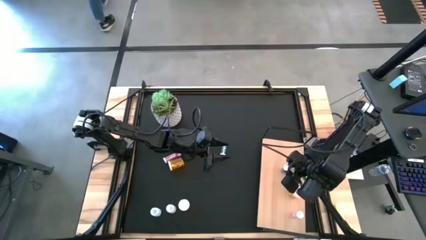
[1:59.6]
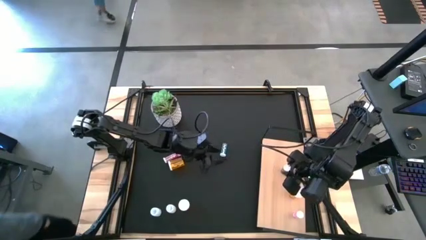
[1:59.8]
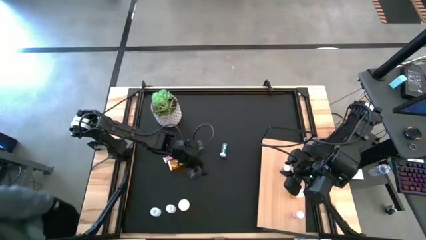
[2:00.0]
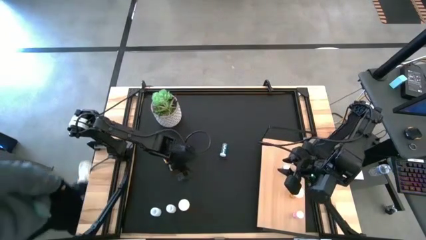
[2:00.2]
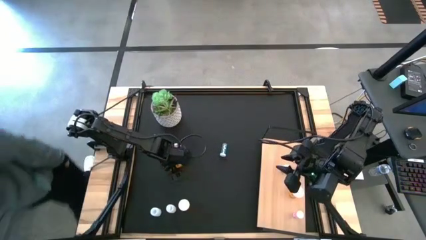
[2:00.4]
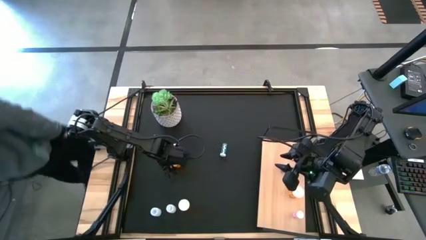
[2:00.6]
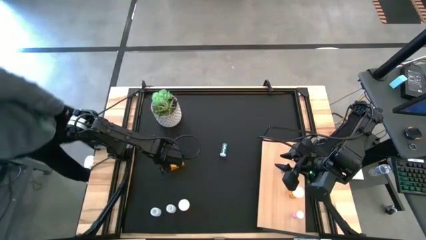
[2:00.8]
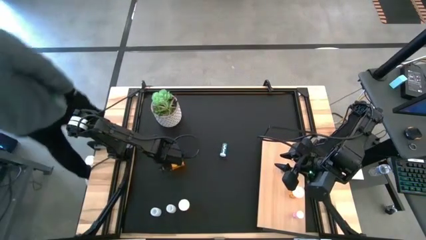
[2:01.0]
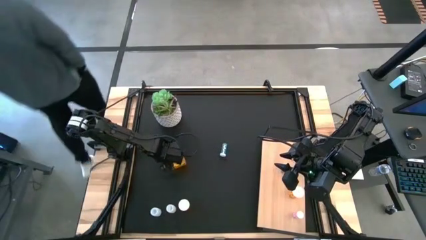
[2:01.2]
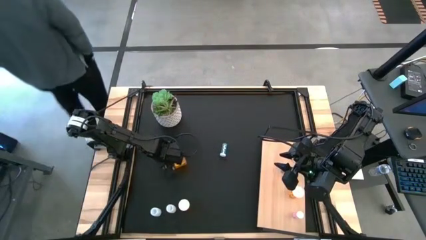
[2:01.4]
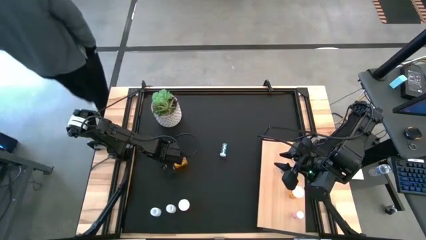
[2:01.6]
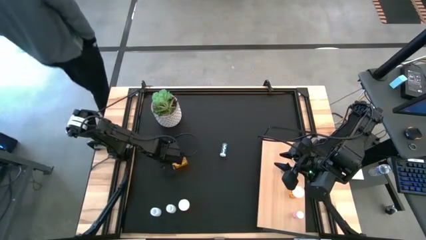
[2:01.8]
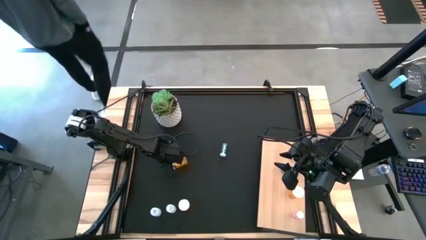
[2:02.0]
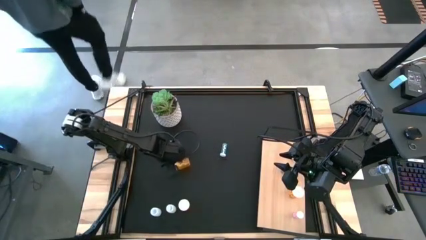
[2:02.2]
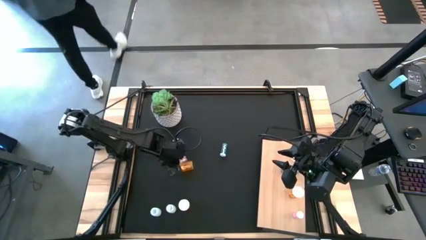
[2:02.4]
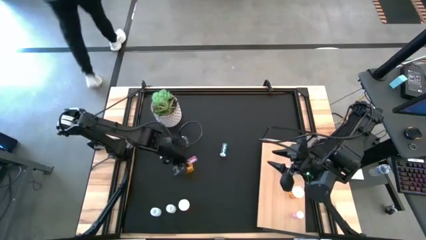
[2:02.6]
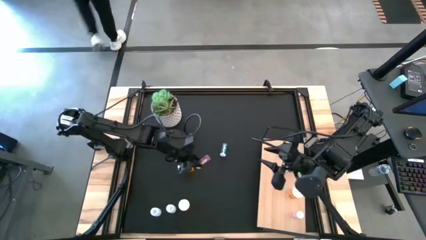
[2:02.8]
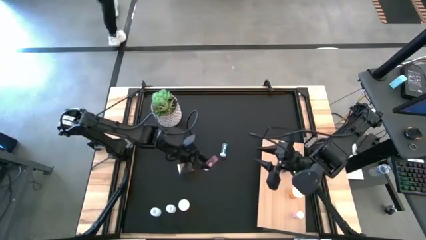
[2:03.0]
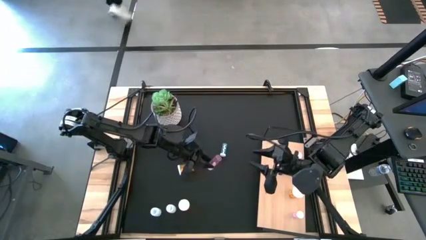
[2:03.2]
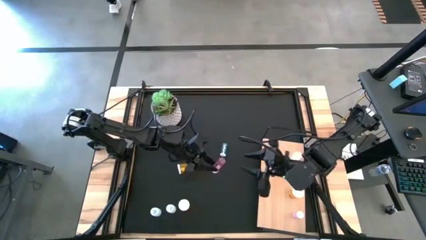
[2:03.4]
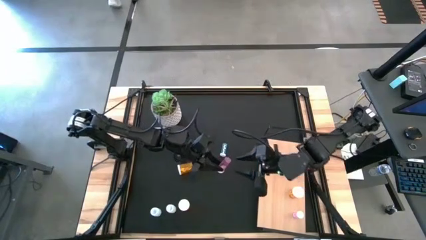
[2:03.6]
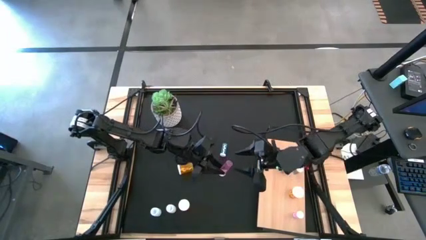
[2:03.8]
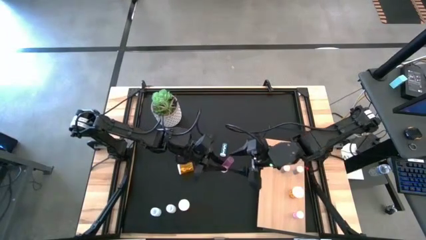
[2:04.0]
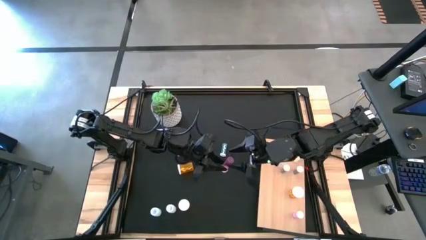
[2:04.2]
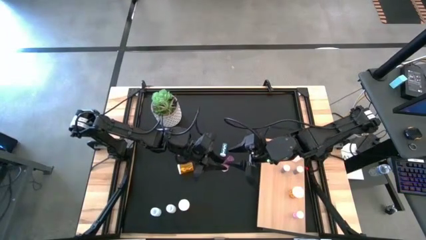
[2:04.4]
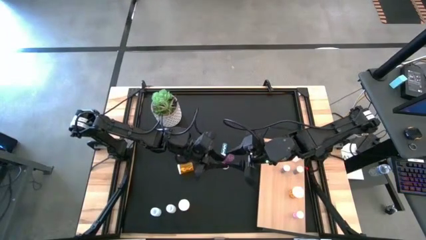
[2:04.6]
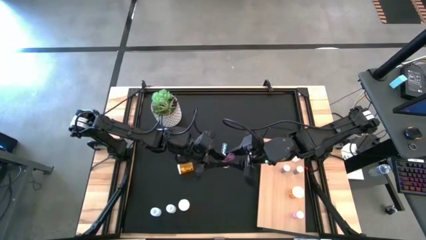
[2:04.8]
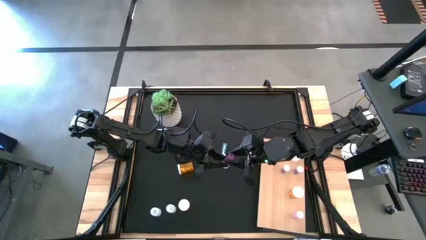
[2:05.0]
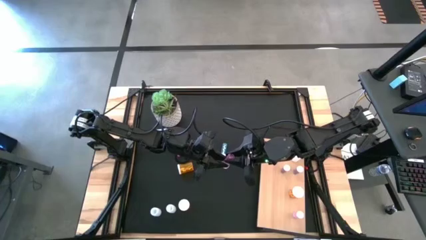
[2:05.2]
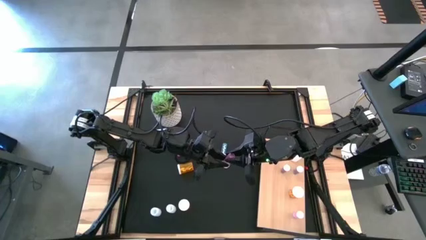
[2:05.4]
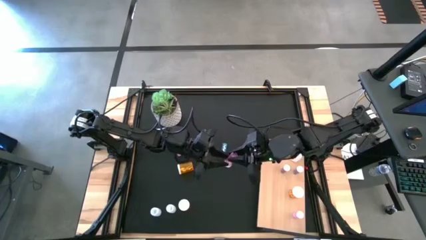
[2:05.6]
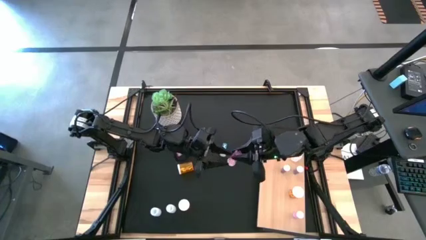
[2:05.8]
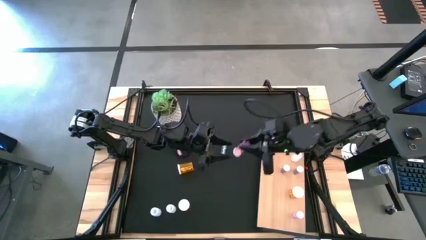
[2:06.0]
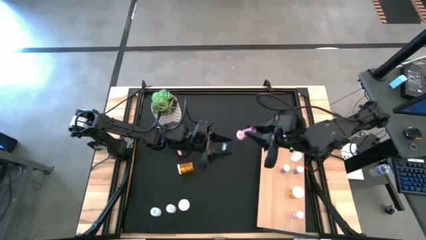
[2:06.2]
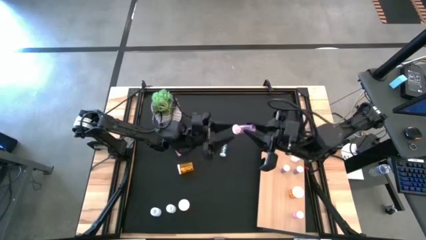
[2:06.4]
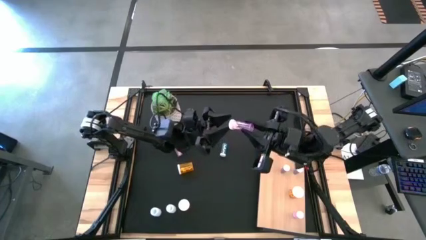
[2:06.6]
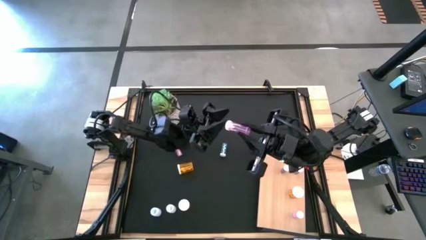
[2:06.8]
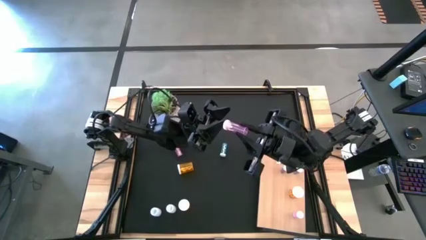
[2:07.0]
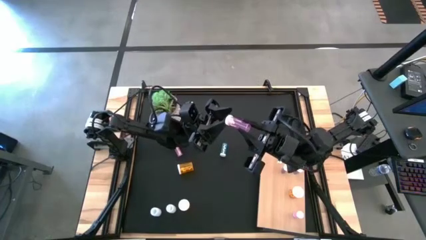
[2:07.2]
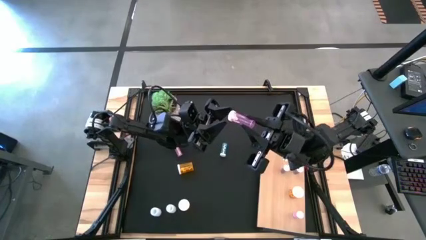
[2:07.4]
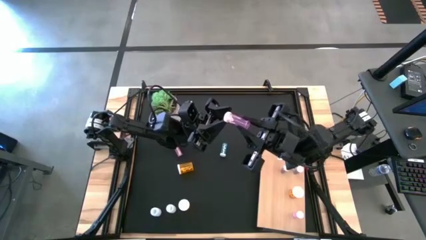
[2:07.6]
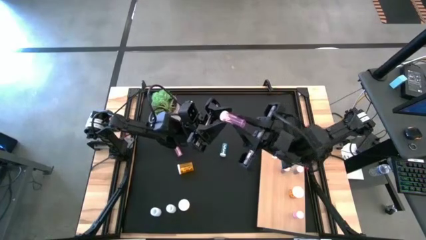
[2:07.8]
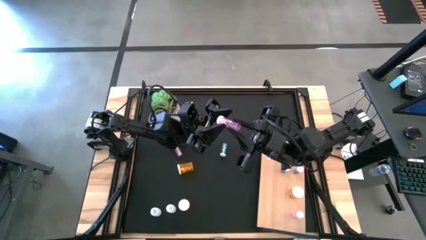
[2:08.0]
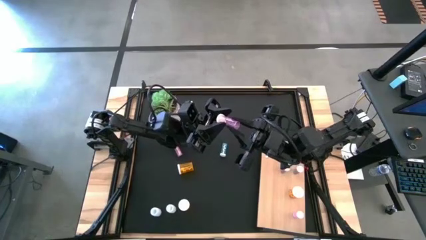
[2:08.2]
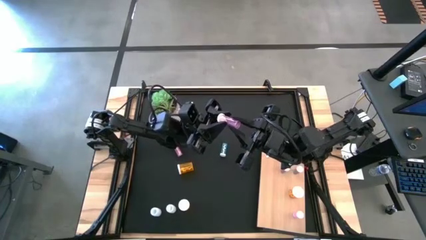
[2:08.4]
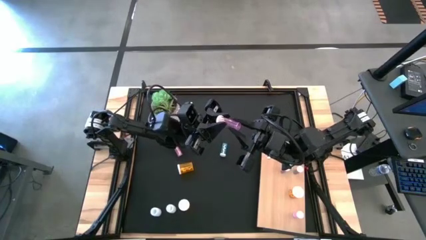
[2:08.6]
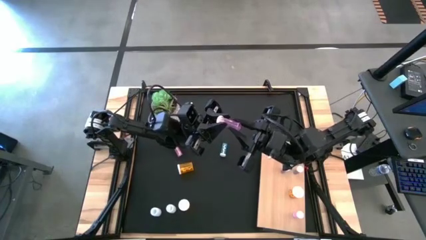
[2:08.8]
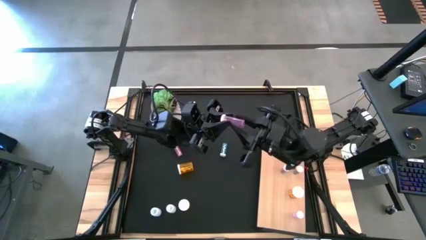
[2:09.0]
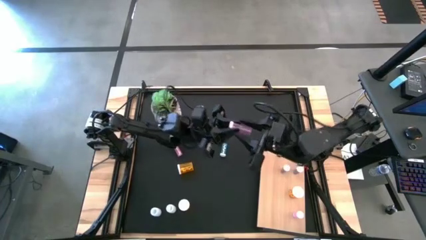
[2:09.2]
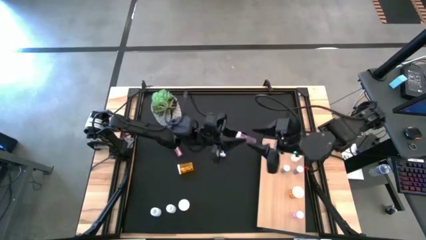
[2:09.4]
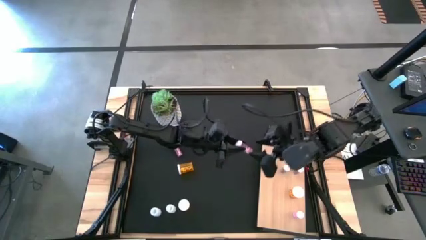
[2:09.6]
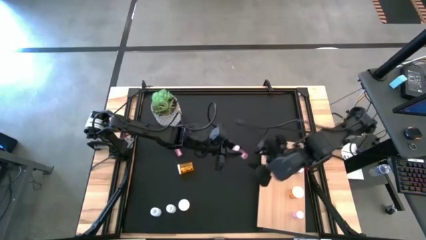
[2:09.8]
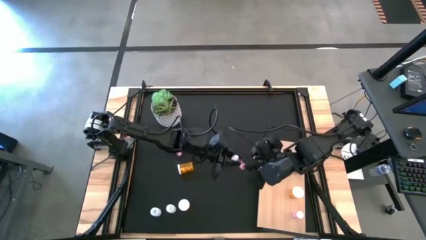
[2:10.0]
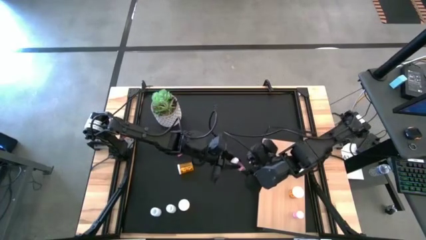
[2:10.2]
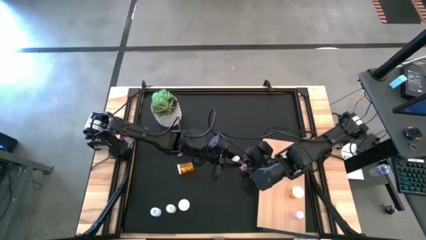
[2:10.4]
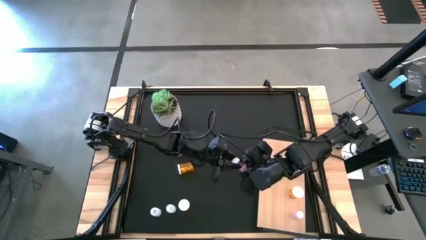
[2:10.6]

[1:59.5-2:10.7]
Task: Pick and place medicine bottles onto shelf by color
Put the left pink pill bottle on the shelf aligned with the other pink pill bottle

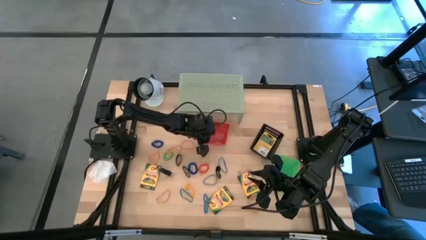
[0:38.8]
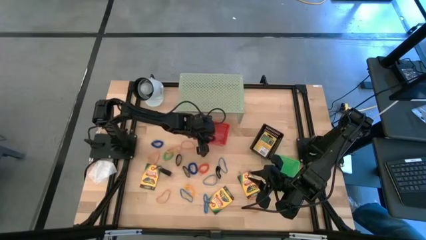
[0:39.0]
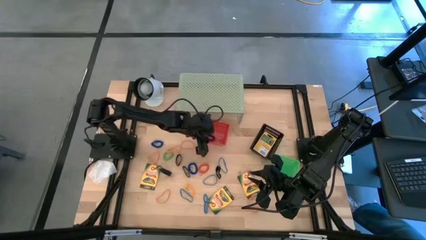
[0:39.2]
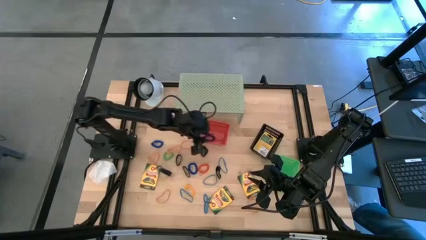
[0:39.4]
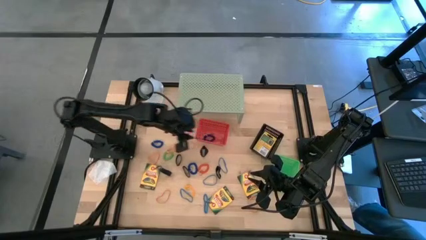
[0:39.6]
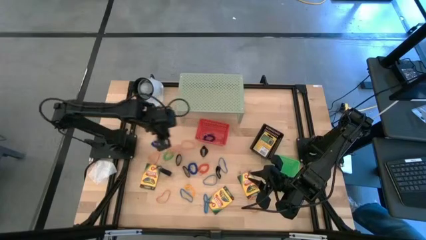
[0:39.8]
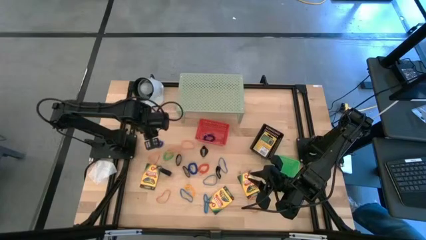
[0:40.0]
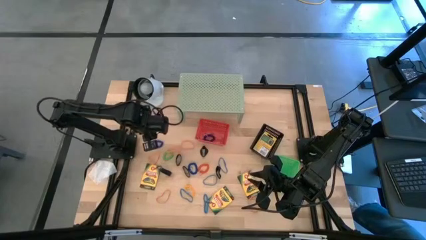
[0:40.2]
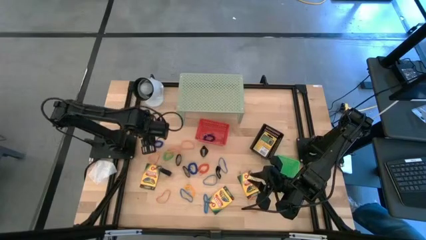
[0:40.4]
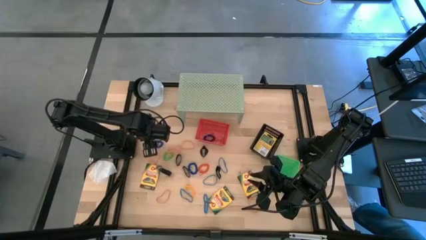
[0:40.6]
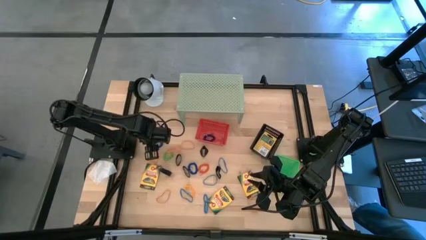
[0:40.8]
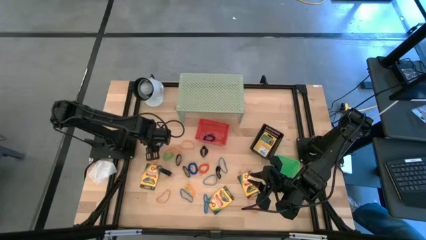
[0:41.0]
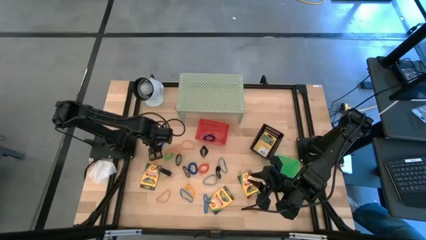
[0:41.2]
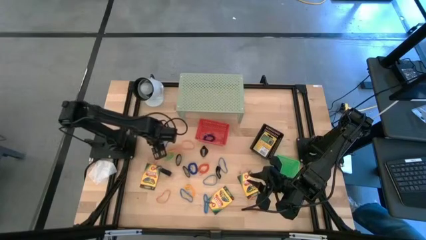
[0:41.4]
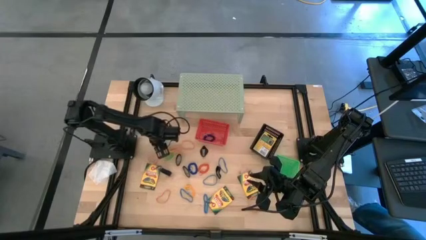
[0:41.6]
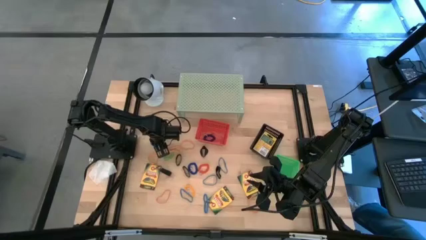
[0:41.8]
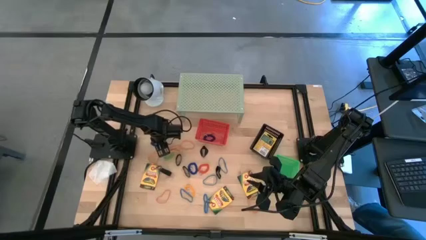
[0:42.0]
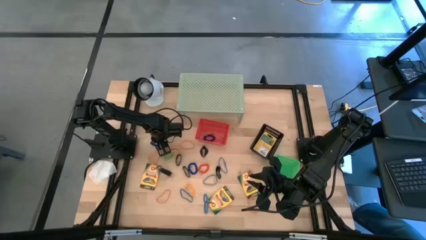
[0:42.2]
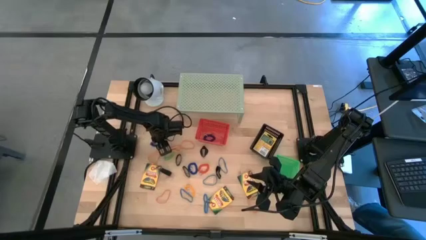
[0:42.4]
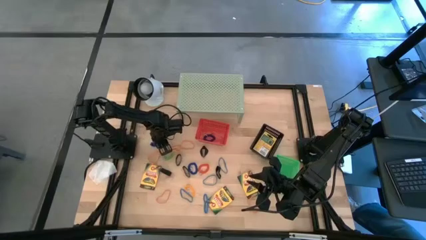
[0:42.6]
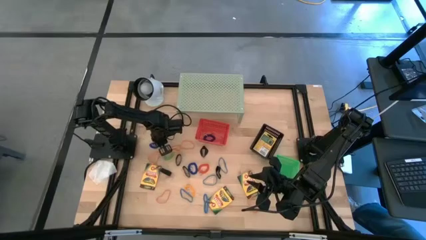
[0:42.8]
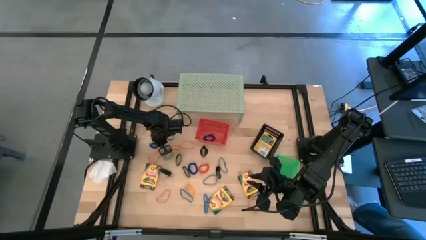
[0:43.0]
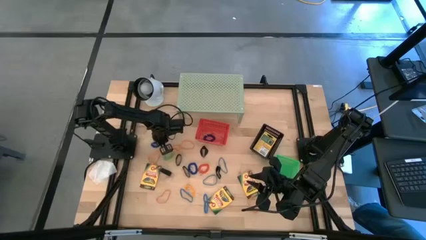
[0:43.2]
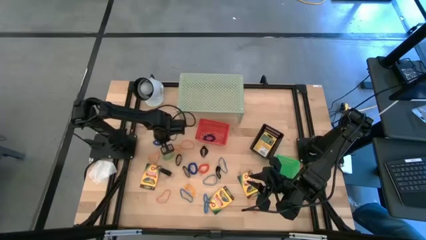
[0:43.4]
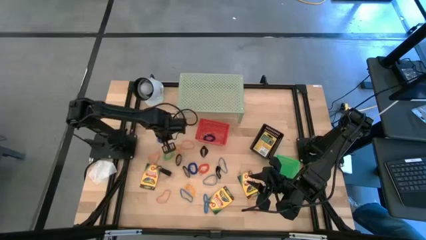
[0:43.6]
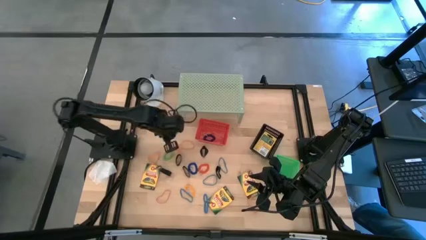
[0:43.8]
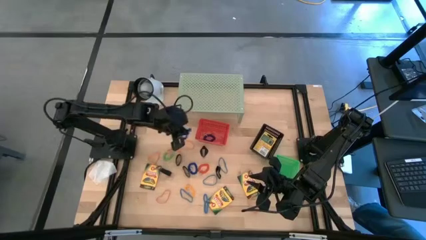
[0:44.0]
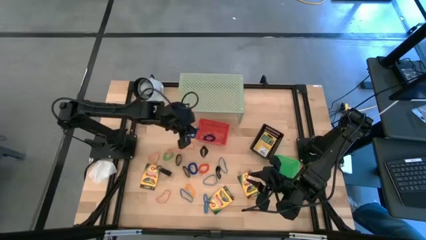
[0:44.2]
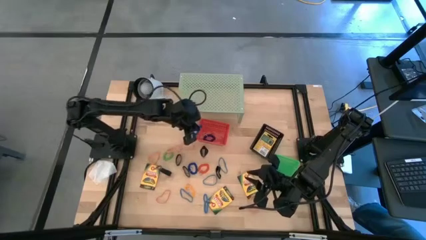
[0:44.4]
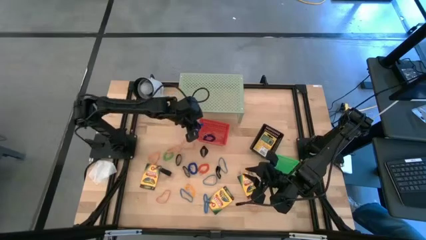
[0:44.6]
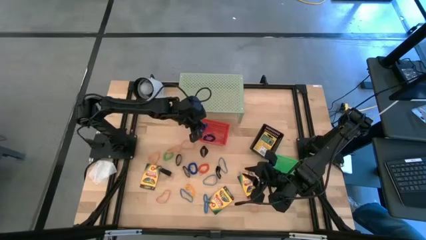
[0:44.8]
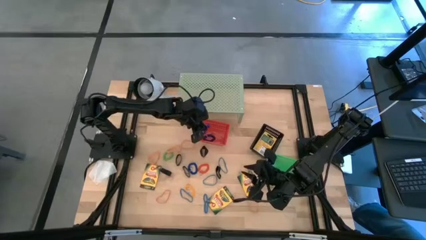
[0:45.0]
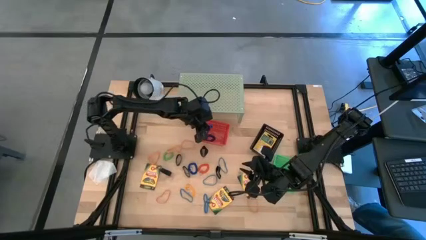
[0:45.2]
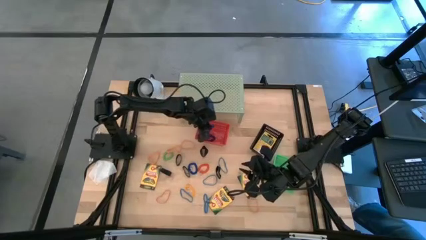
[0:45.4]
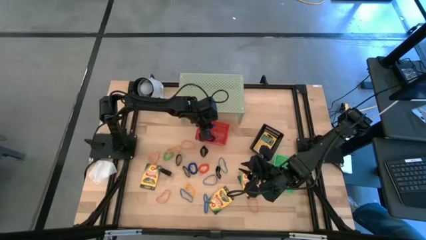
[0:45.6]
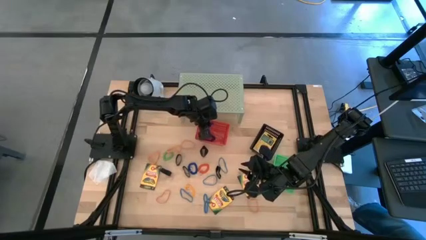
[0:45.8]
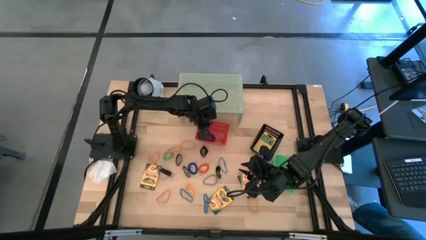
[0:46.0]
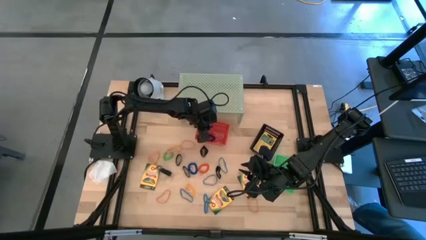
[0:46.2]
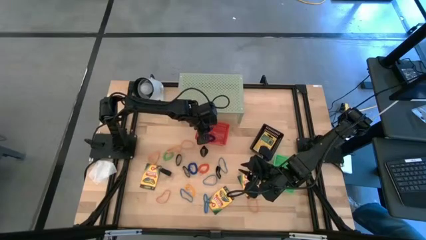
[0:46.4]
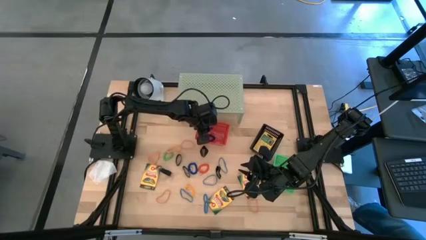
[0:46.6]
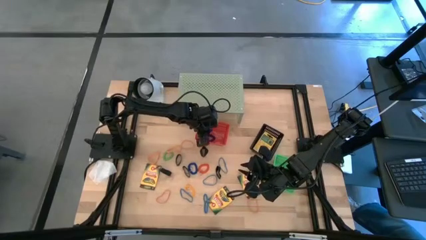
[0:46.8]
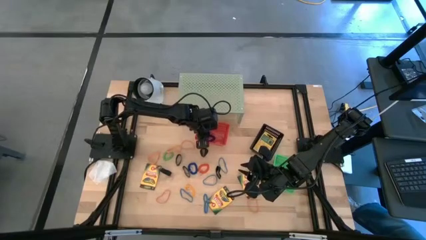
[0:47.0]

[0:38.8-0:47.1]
Task: Pick & Place Office Desk Supplies
Put the blue spring keychain into the red bin
